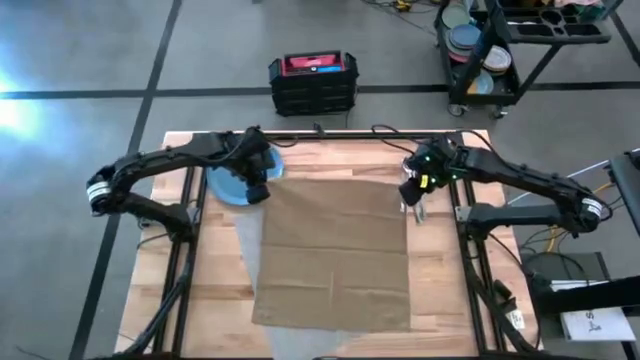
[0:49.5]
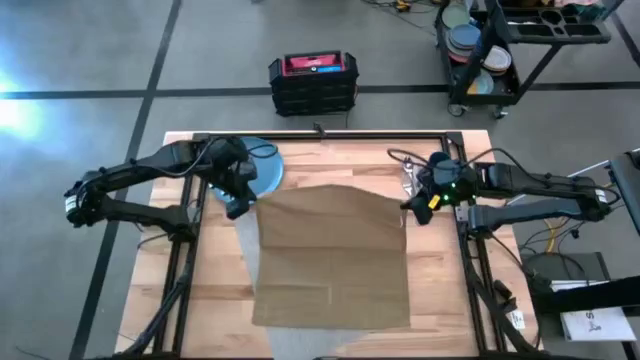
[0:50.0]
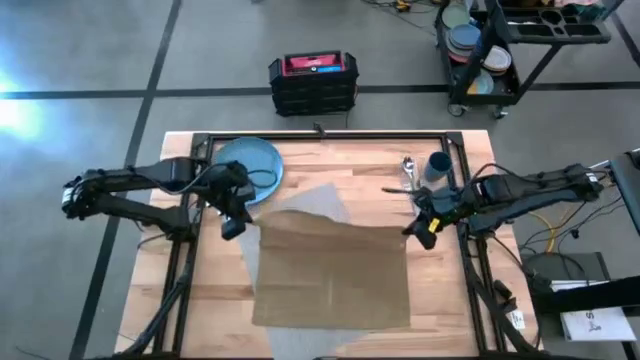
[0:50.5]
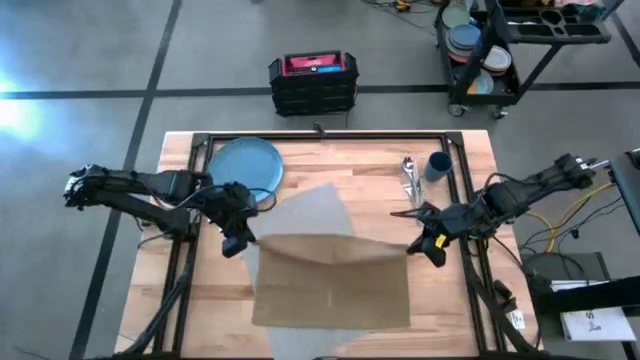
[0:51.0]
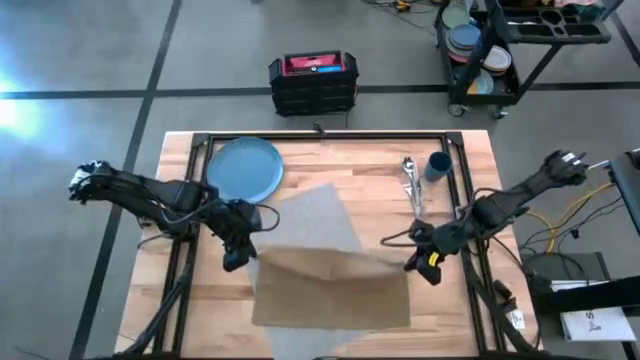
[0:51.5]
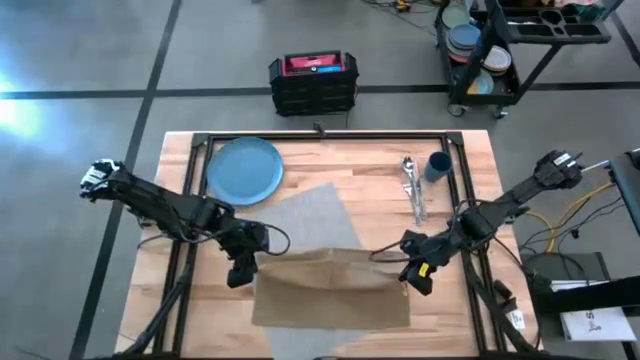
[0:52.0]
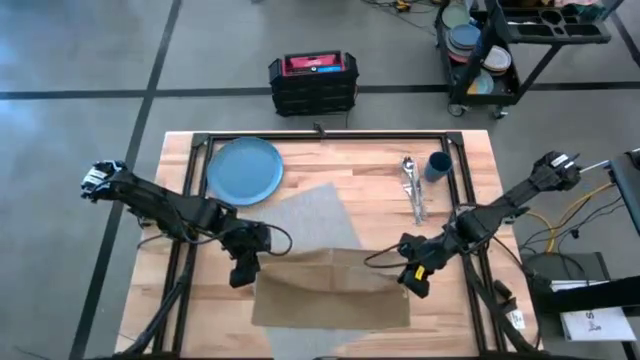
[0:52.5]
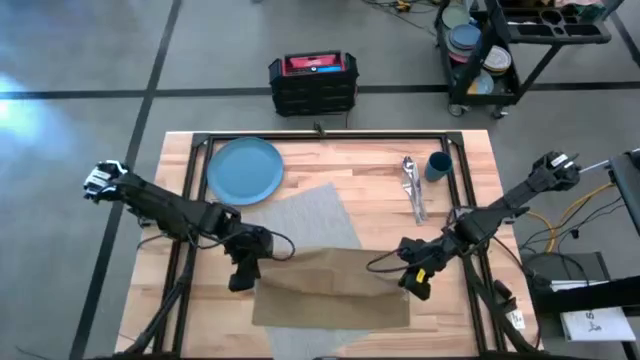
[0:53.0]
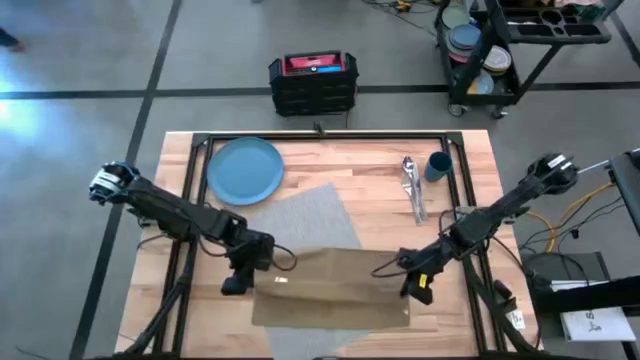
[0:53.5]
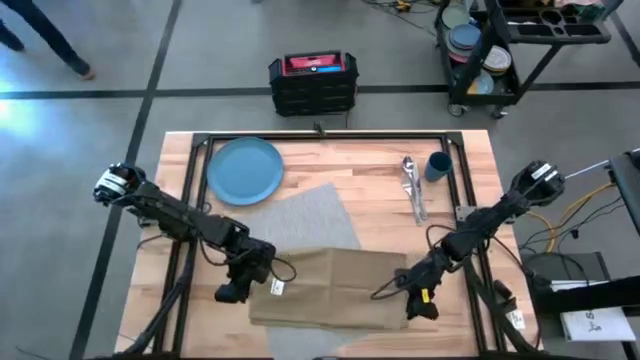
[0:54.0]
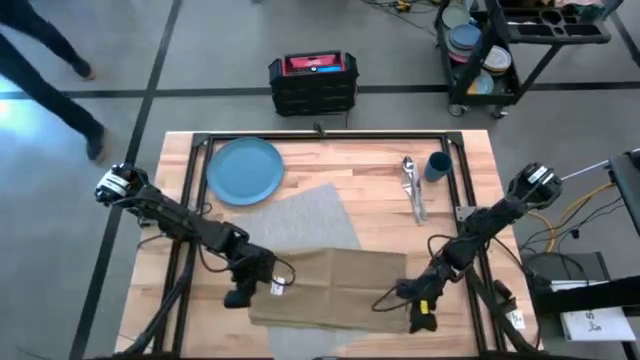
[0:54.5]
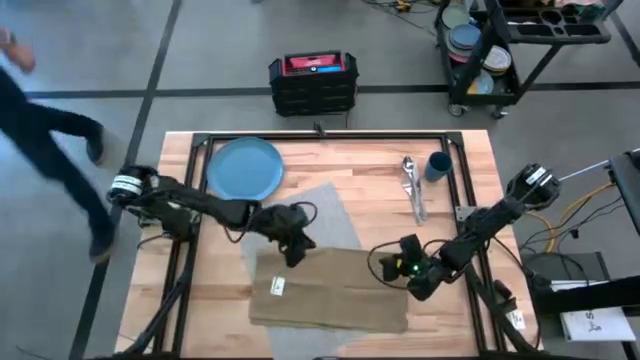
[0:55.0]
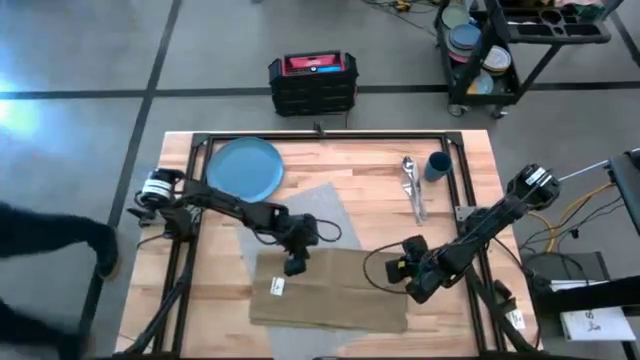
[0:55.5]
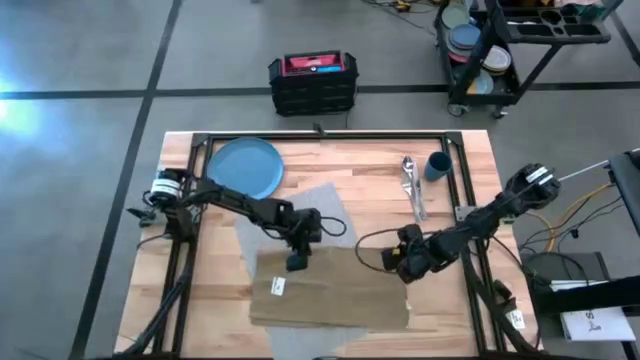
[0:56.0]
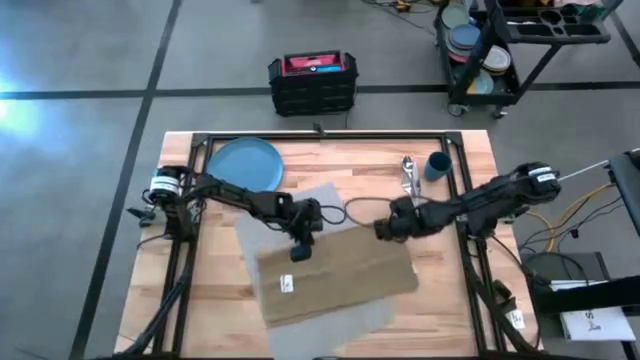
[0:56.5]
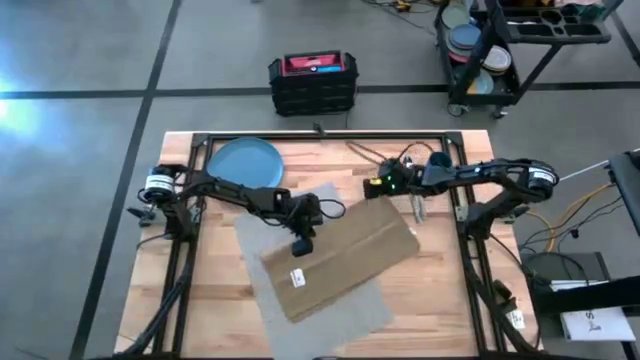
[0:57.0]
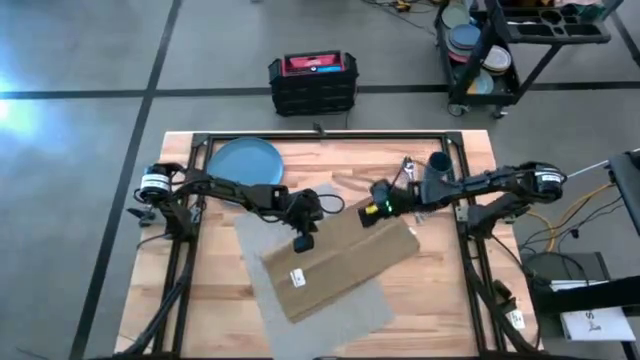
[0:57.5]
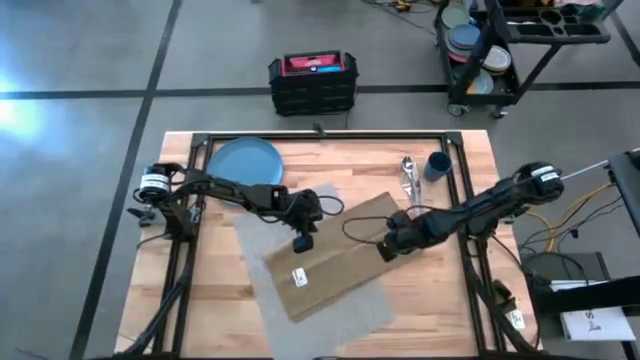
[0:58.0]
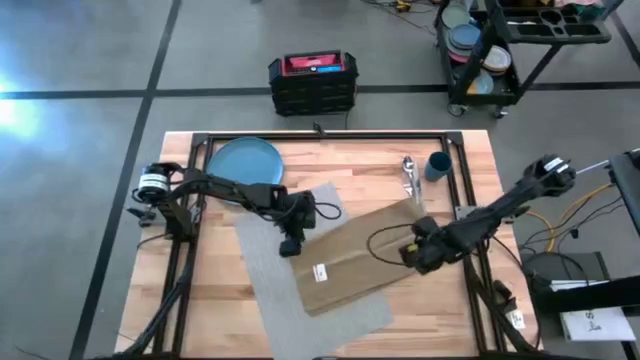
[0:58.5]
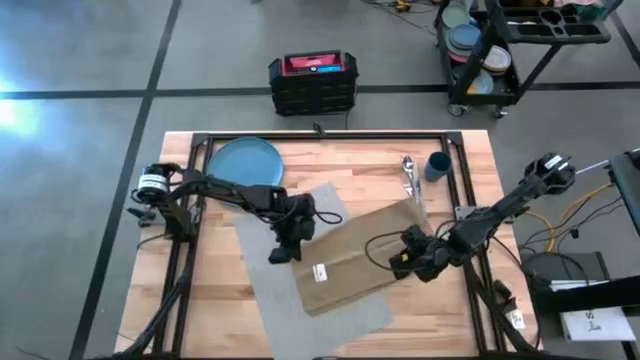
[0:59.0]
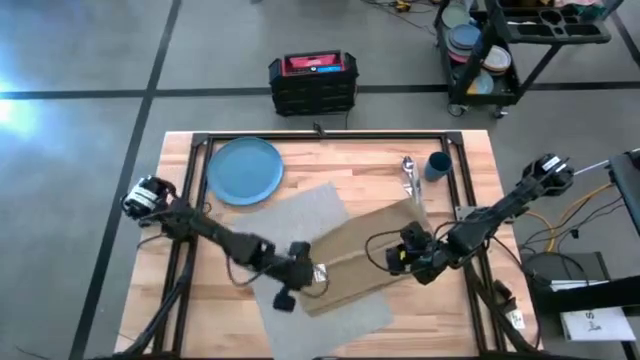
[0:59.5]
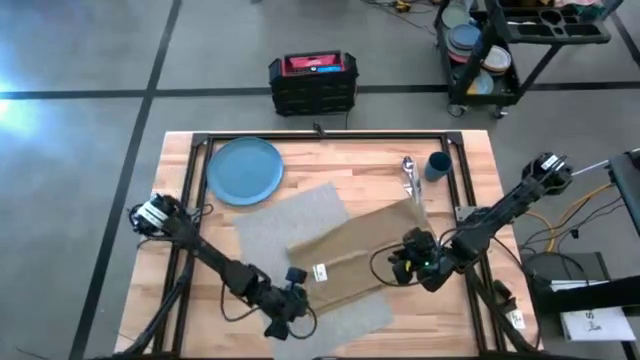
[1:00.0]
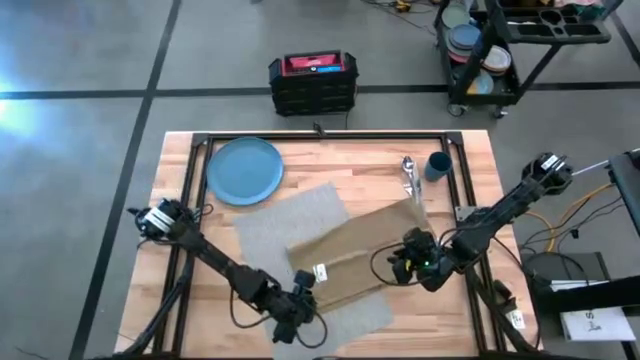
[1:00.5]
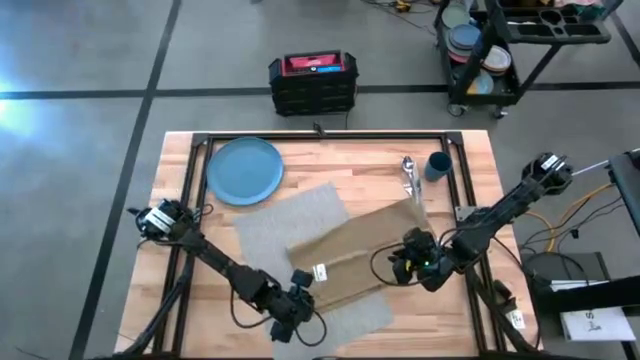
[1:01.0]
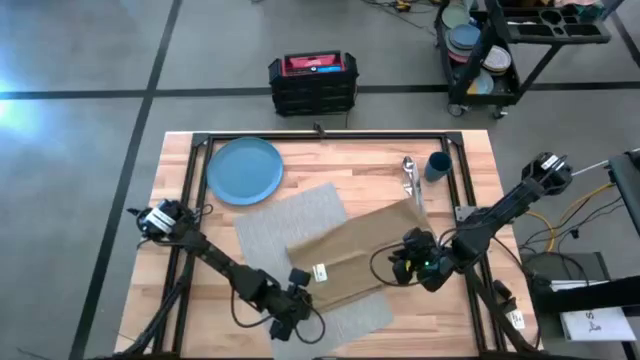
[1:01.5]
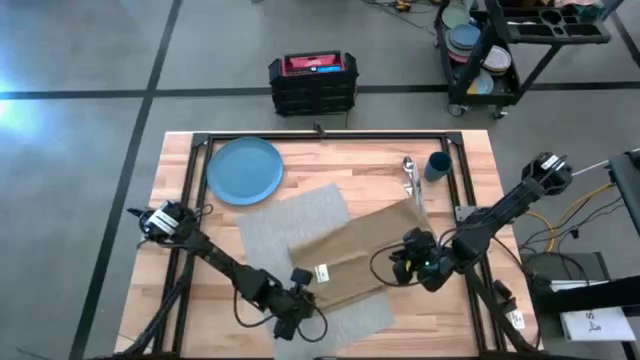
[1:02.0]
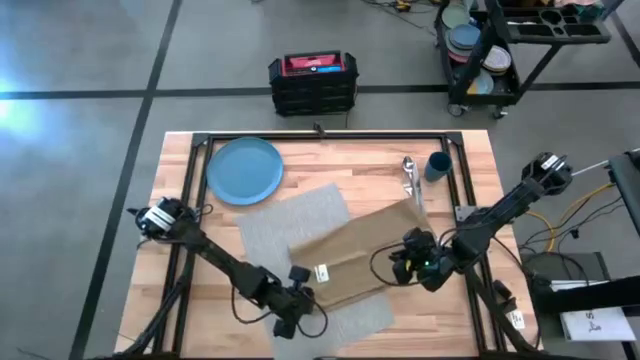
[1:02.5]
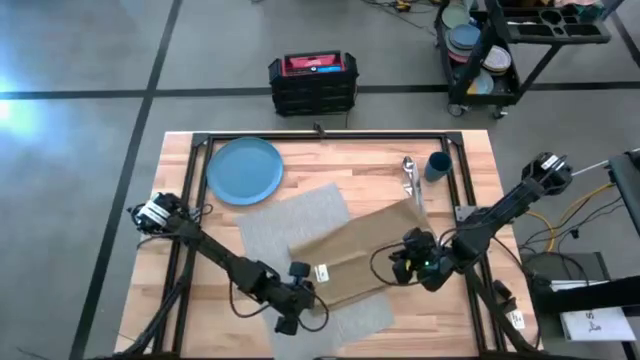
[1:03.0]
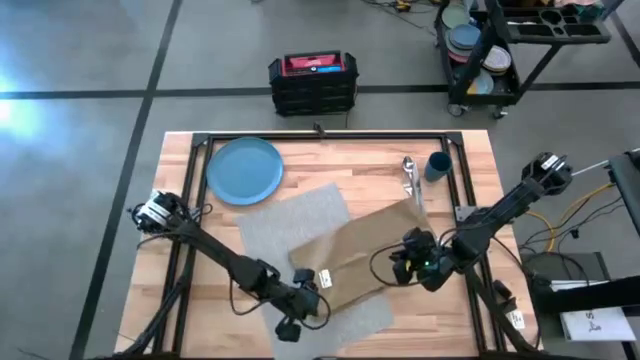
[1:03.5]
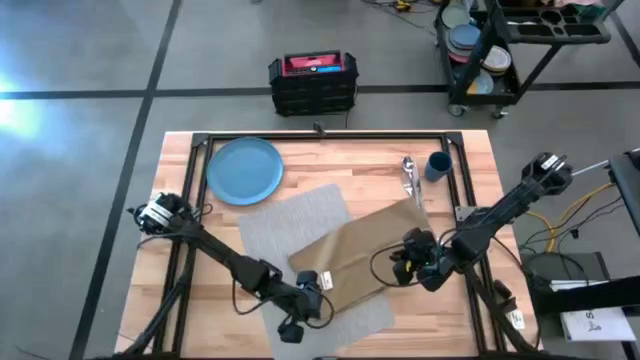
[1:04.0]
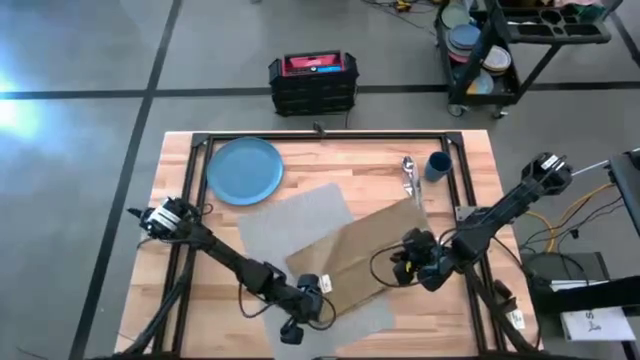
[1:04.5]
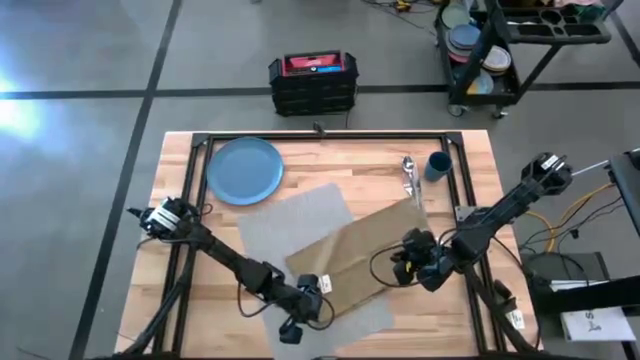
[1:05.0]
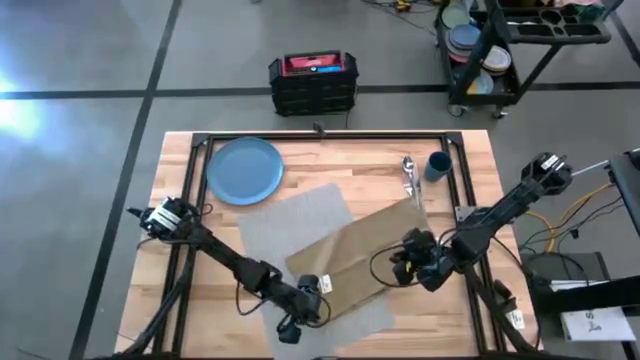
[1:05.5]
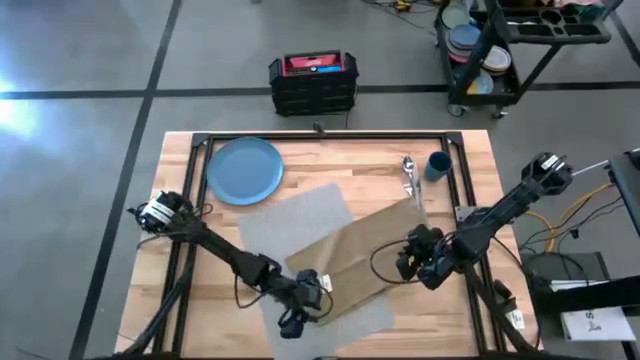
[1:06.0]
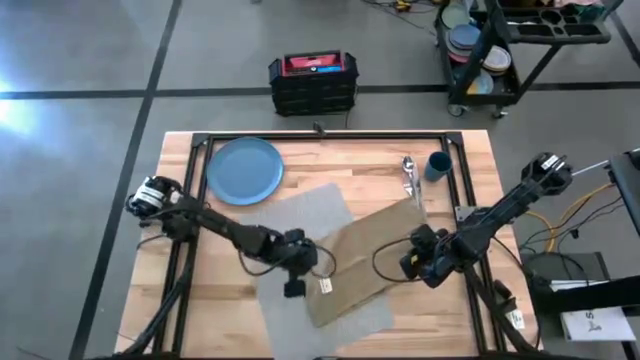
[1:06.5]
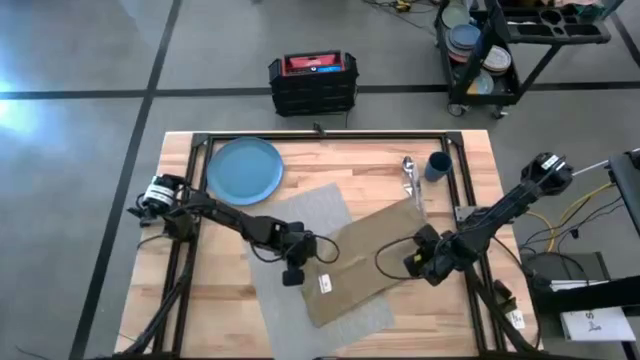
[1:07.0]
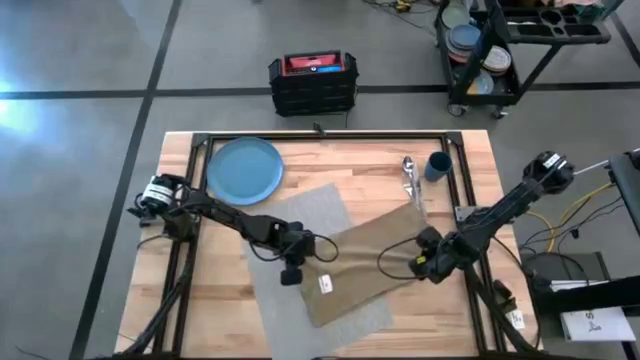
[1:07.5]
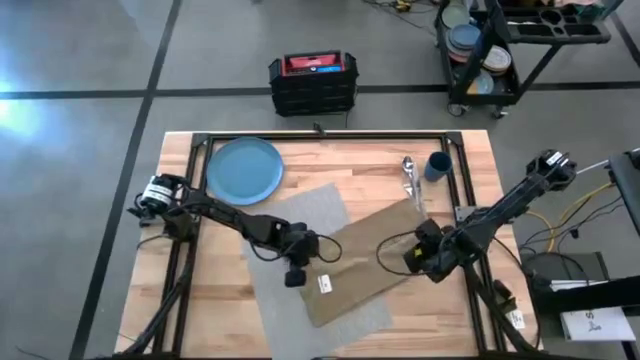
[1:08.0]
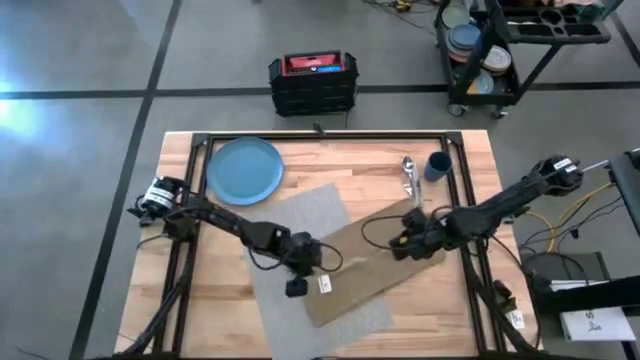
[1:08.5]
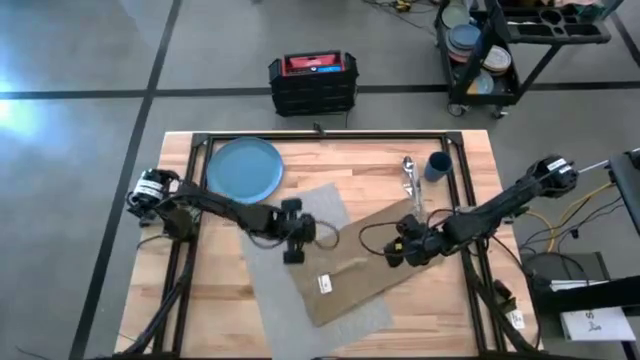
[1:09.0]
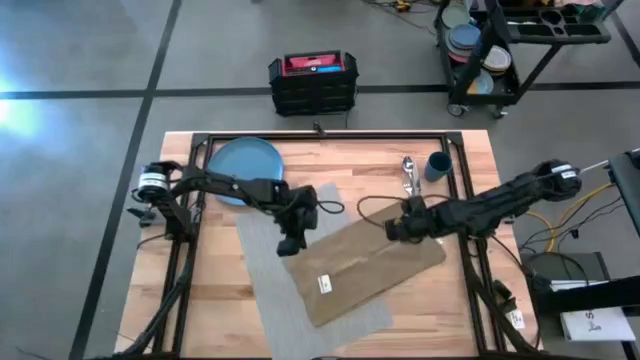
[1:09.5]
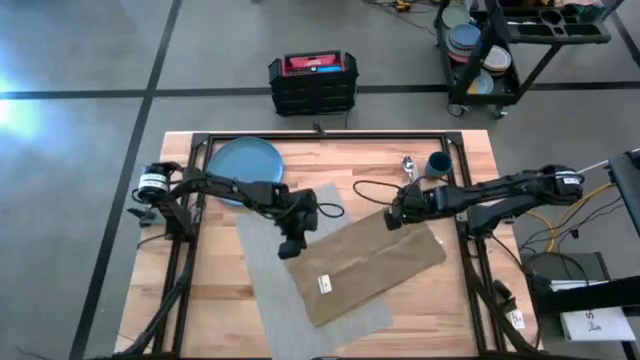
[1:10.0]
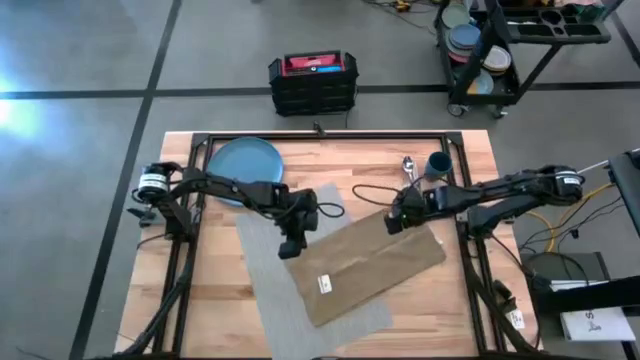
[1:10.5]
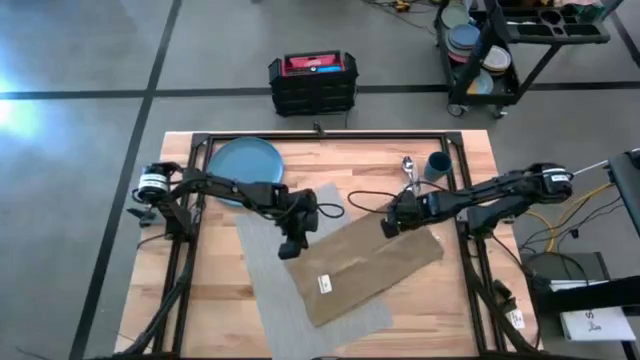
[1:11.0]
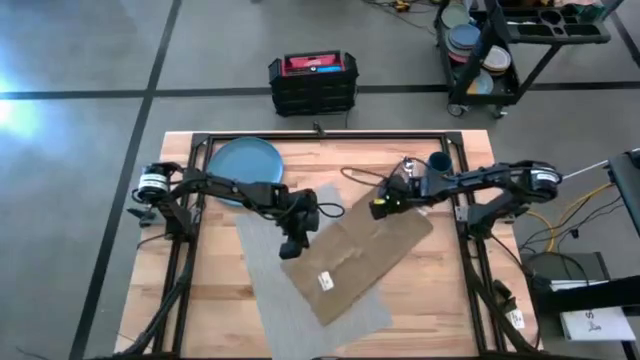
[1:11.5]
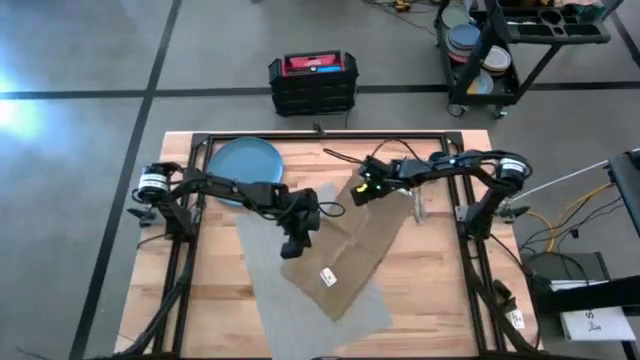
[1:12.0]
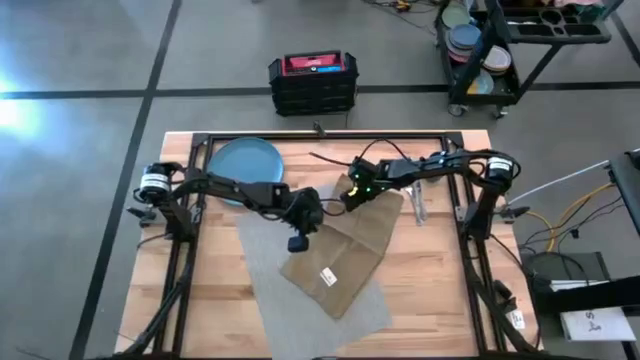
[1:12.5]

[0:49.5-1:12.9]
Task: Set table place
Fold the brown table napkin
